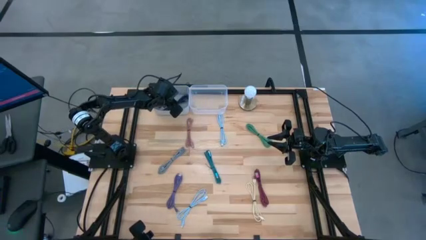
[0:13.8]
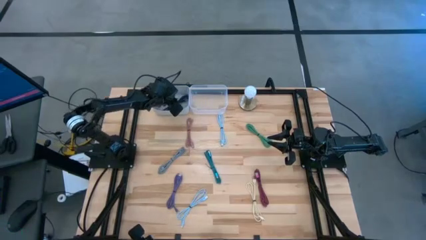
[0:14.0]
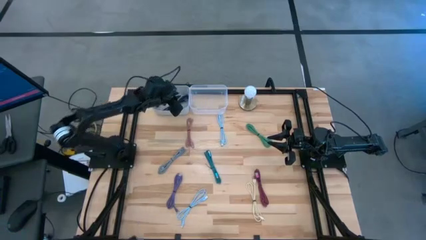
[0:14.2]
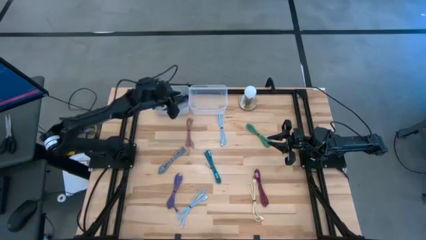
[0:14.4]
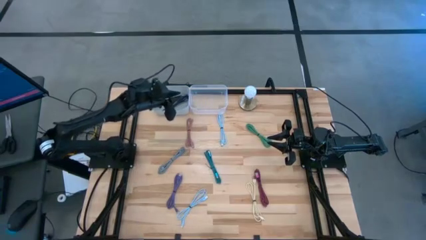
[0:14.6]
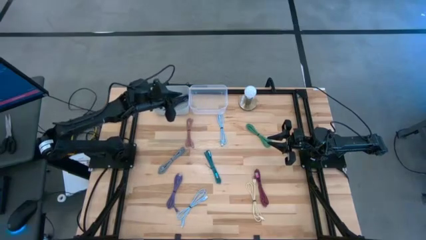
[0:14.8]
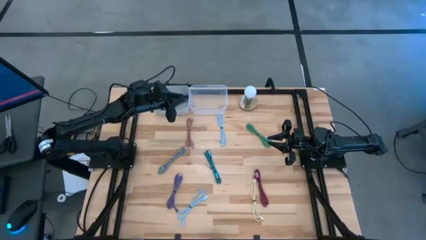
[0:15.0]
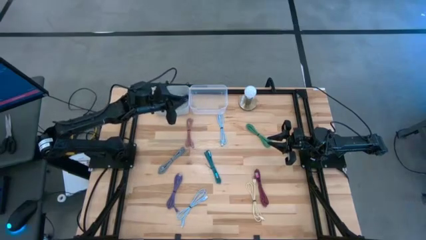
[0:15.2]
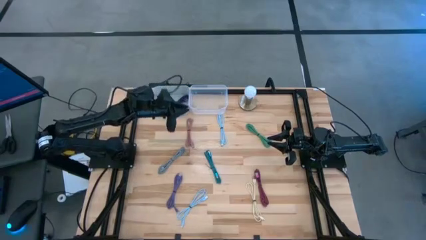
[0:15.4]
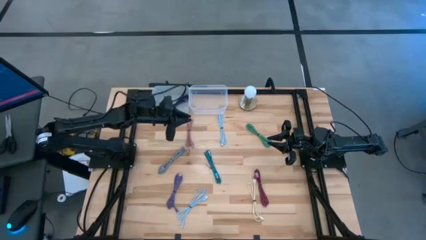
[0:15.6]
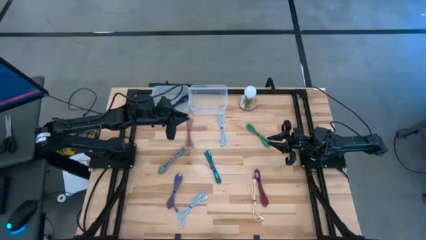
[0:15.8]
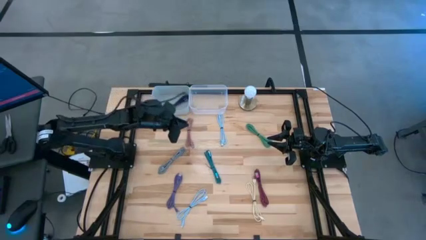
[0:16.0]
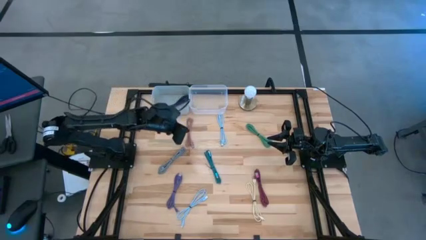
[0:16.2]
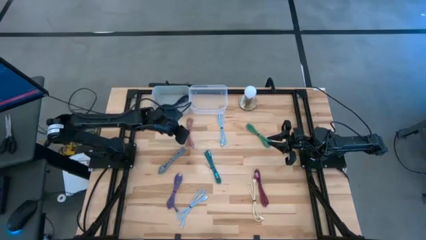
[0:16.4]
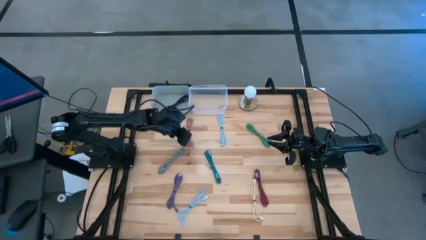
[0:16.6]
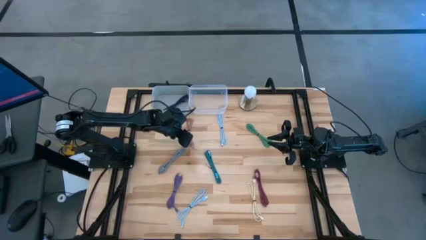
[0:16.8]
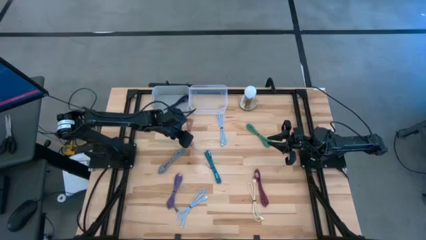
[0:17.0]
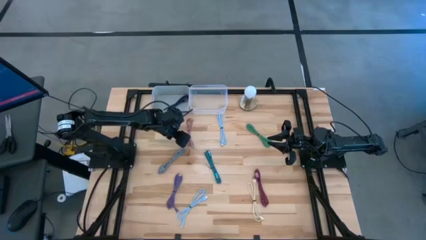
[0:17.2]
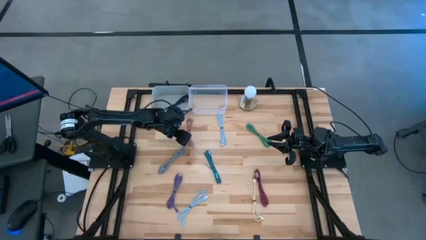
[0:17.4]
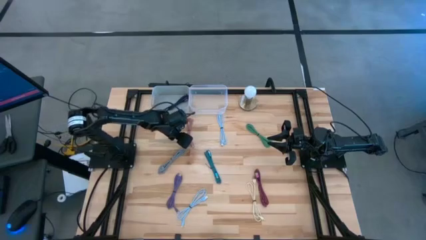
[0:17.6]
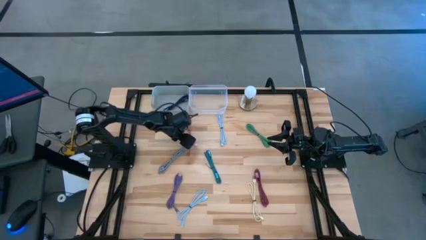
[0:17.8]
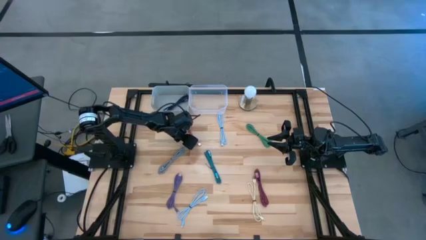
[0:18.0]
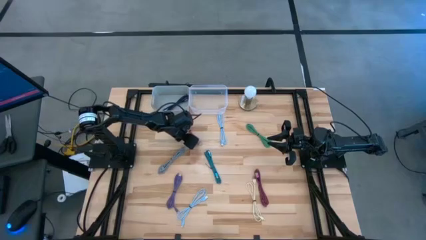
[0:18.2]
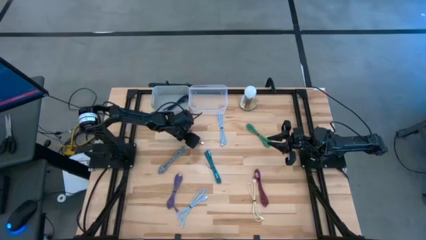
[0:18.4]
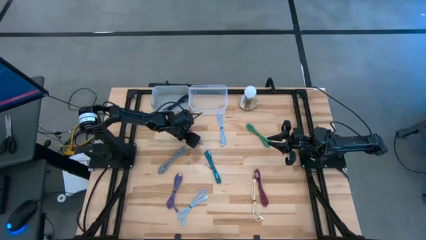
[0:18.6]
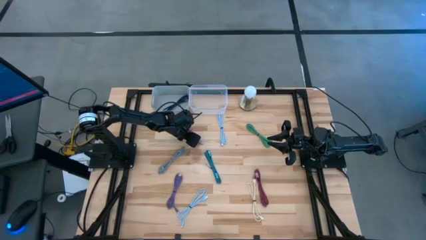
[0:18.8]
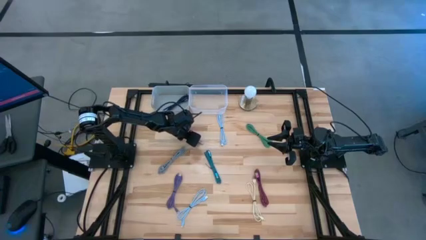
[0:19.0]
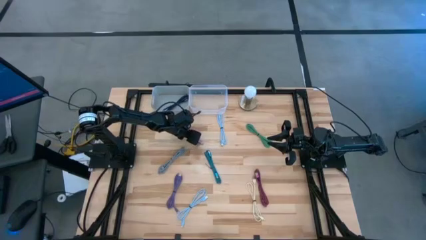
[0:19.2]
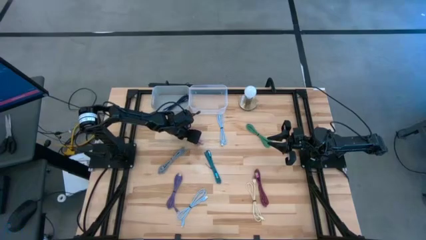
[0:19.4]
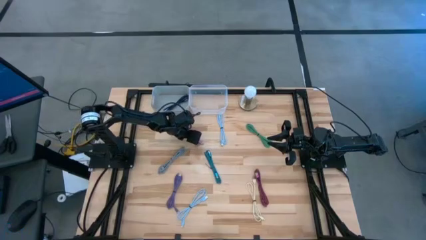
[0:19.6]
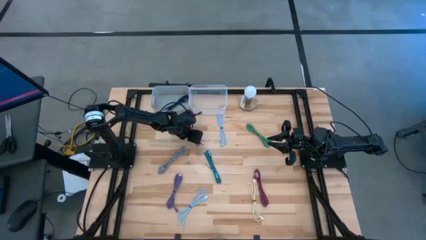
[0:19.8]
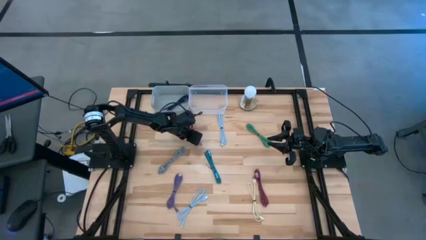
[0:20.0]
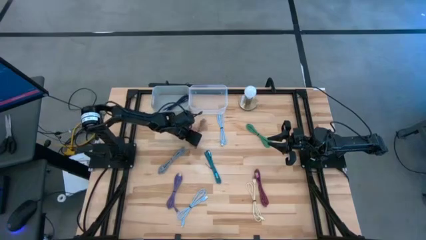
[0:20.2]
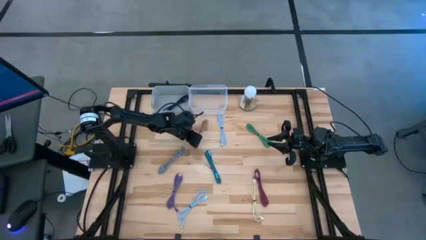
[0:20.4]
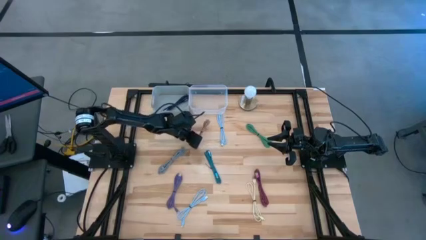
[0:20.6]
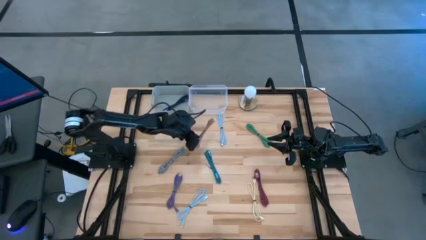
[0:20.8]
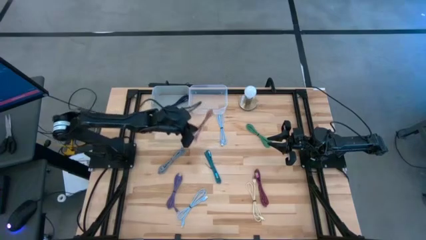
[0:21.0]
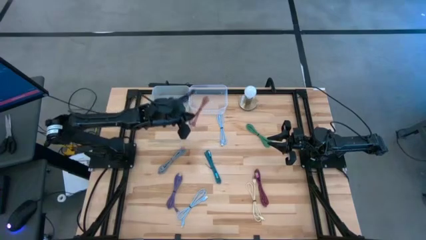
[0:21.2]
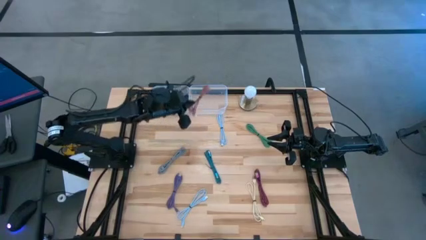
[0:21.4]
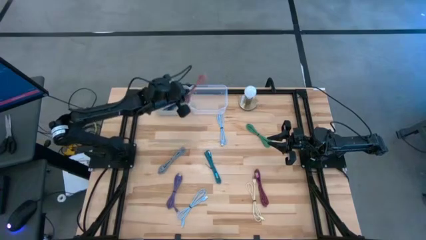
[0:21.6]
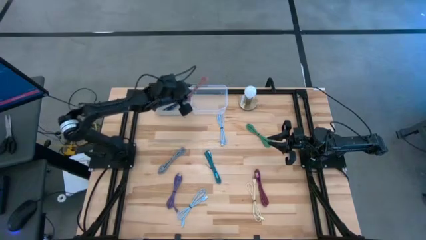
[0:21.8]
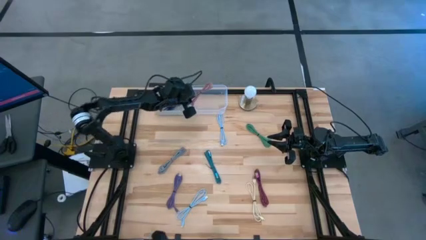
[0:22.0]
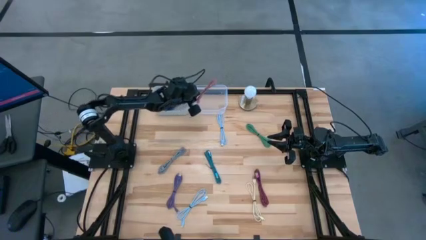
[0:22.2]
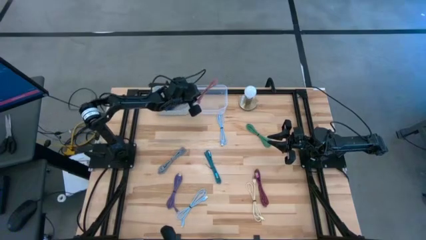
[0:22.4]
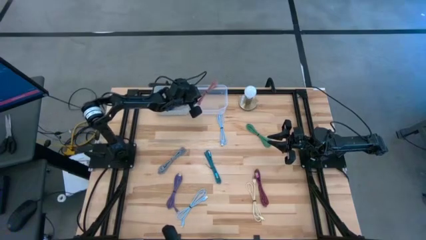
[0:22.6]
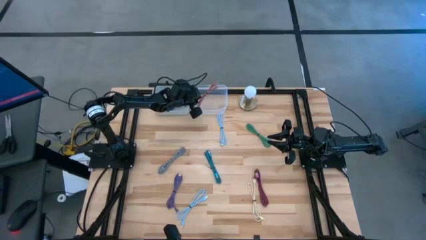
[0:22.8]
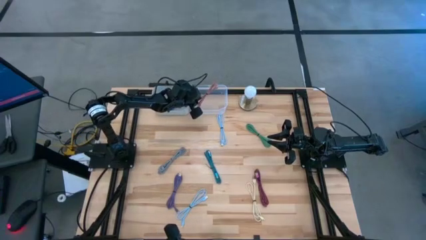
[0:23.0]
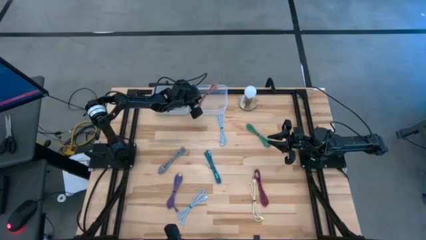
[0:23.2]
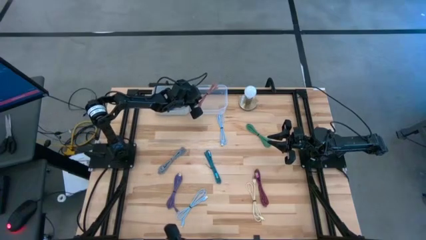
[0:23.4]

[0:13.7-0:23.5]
Task: Pick & Place USB Port
Put the pink USB cable into the transparent bin

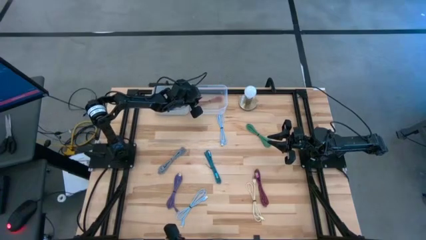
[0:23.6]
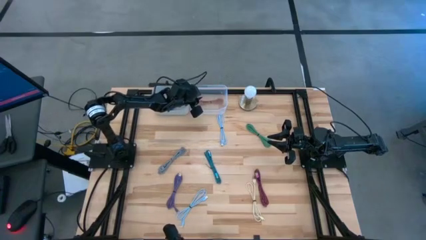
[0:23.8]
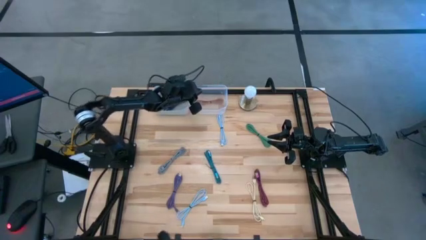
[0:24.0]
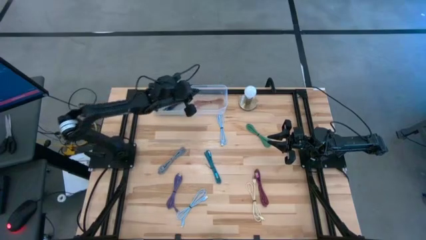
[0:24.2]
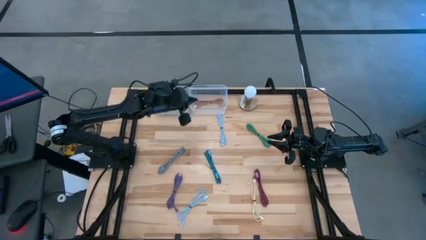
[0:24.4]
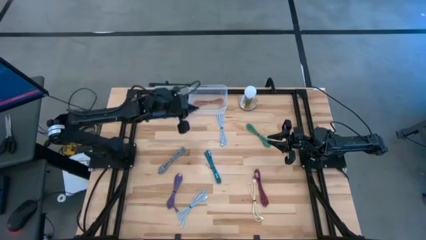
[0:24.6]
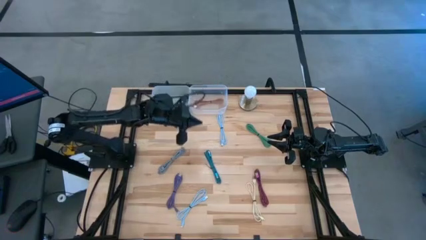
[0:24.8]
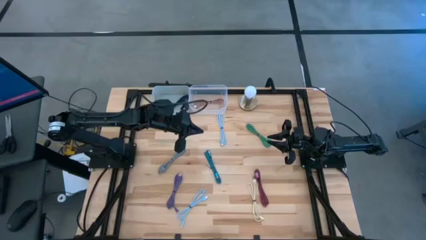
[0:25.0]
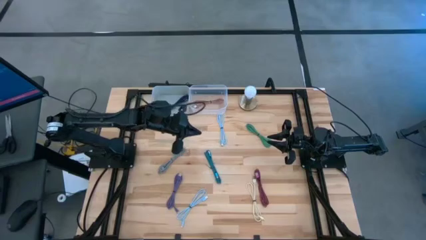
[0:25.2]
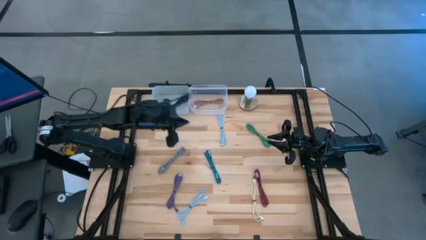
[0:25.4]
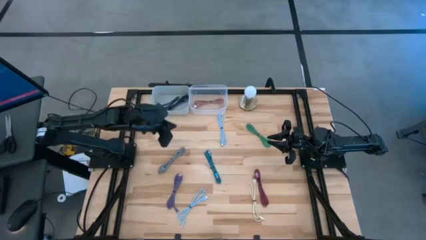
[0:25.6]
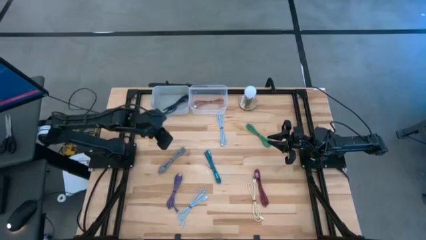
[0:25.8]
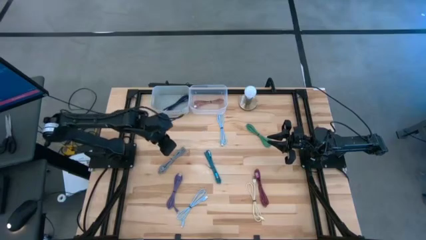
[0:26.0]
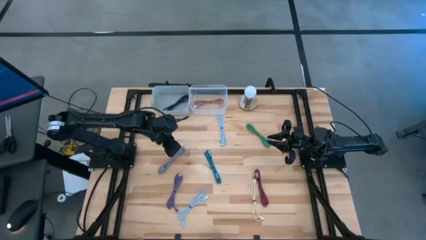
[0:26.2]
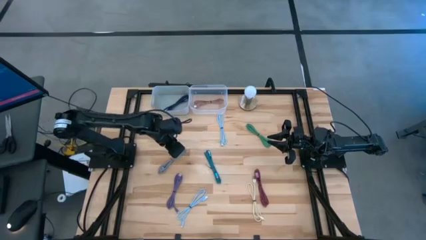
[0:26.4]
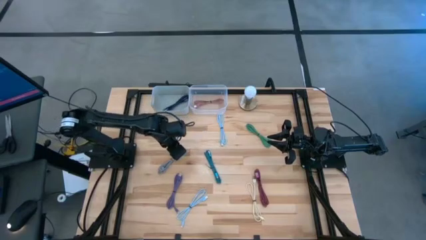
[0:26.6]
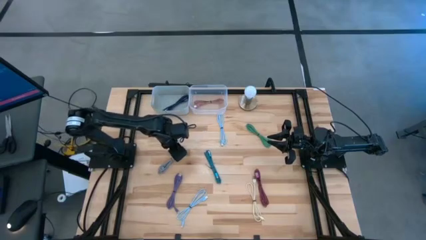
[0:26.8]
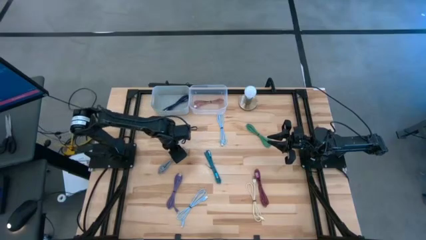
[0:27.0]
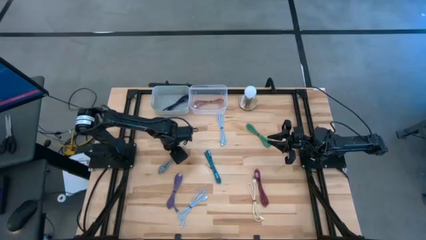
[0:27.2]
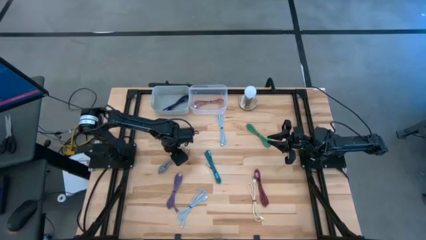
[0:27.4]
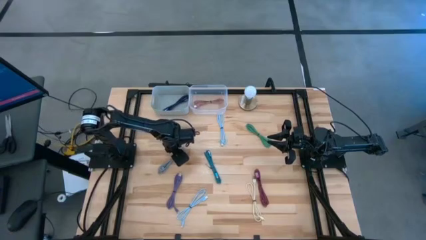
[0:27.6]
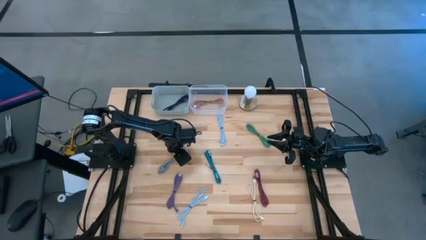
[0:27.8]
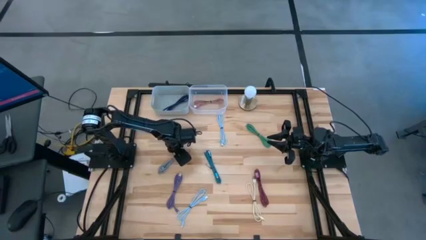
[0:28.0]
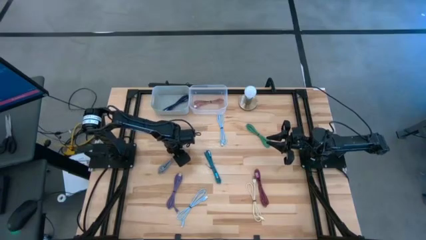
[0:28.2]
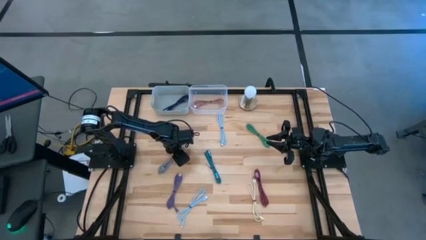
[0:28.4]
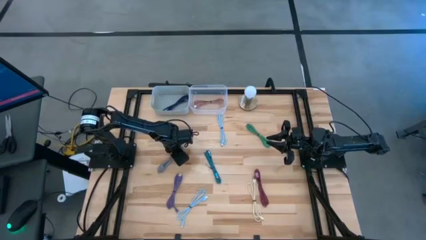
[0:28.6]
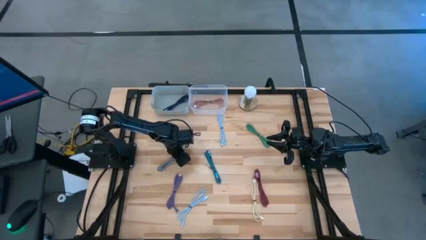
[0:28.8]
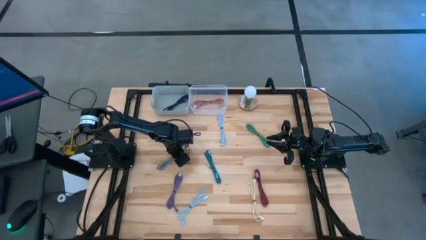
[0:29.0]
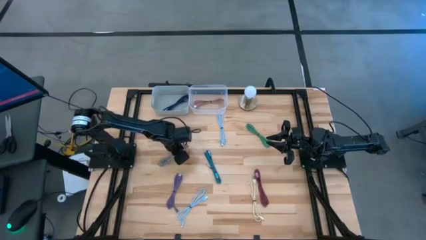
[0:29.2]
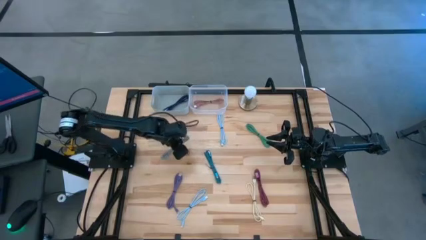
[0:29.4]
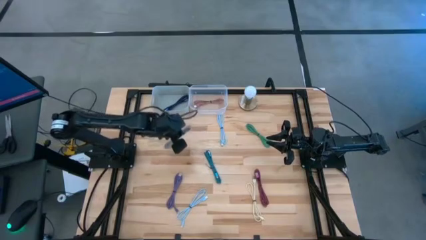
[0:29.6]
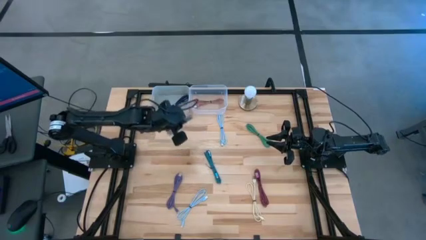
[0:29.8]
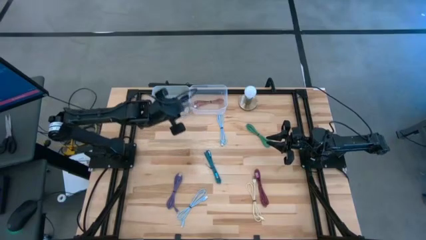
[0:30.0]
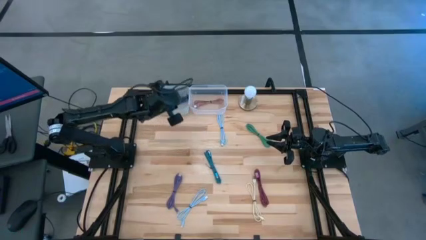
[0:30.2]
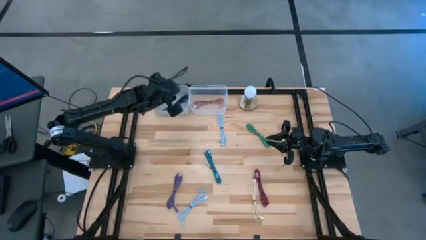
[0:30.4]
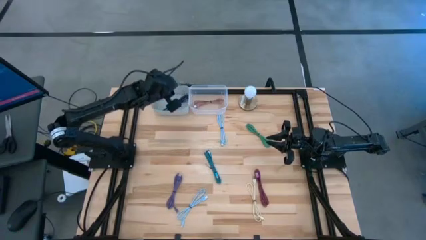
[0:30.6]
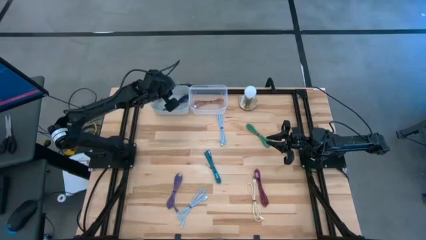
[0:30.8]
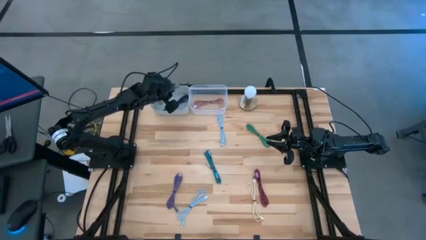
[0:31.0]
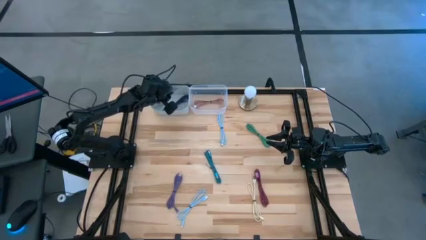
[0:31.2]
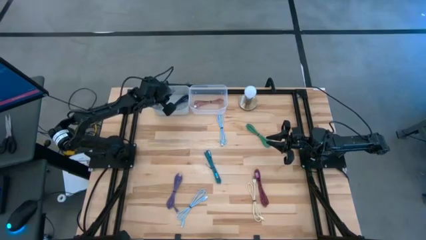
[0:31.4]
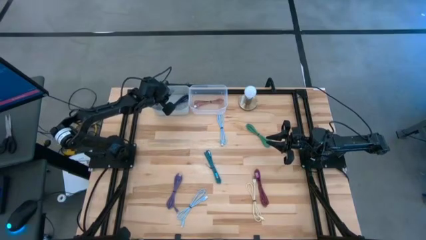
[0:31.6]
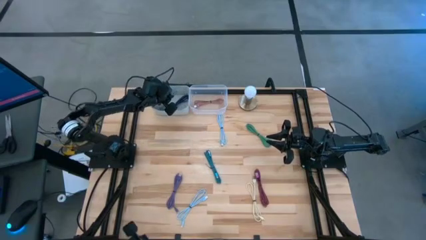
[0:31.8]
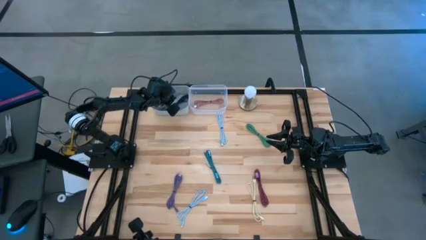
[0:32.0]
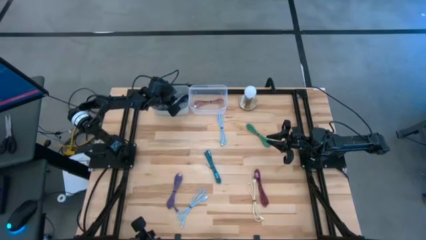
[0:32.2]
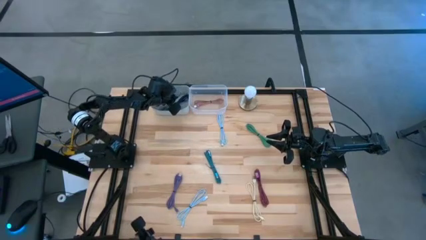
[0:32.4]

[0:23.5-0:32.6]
Put the black and white USB cable into the gray bin
